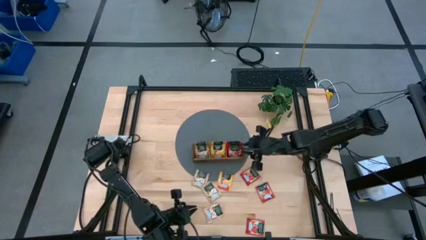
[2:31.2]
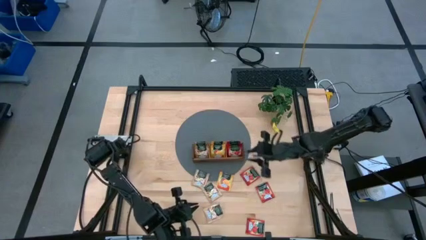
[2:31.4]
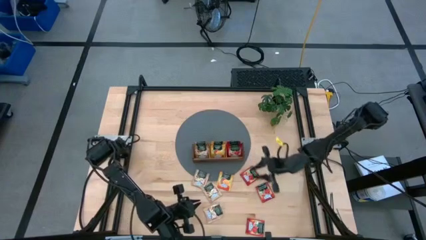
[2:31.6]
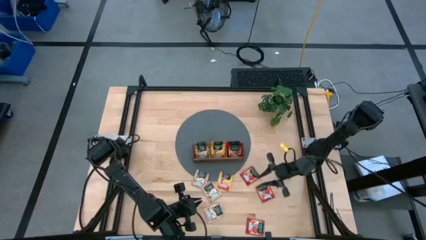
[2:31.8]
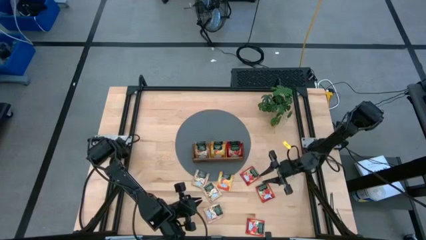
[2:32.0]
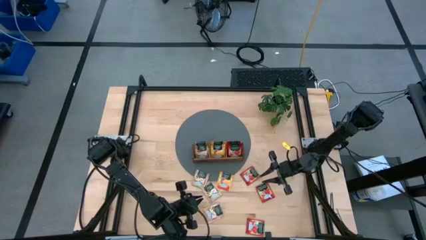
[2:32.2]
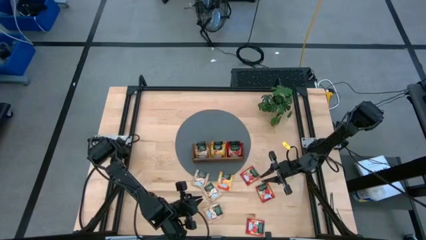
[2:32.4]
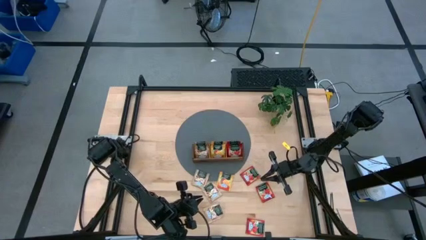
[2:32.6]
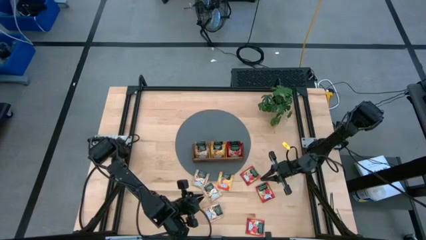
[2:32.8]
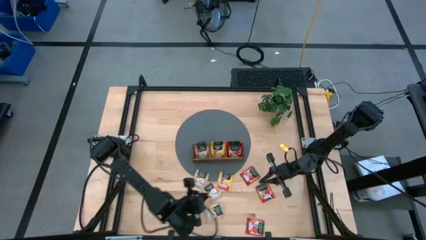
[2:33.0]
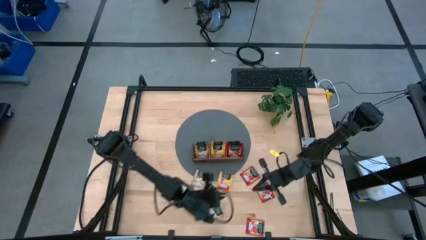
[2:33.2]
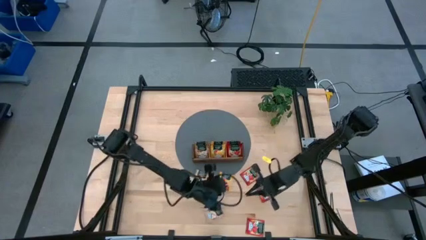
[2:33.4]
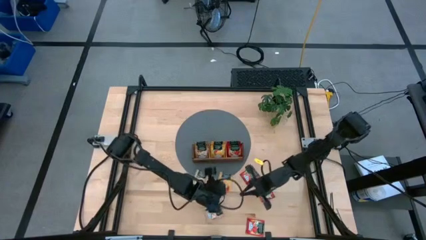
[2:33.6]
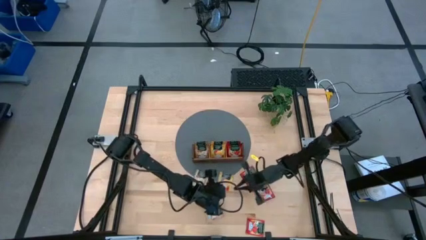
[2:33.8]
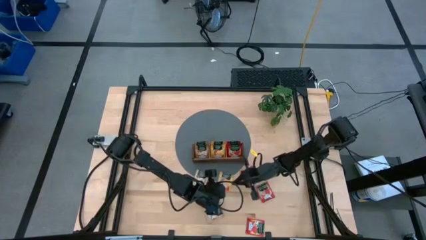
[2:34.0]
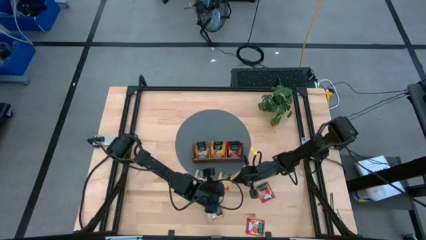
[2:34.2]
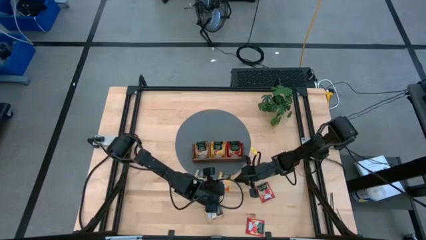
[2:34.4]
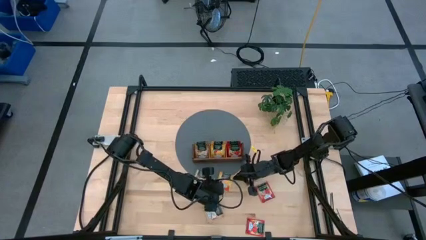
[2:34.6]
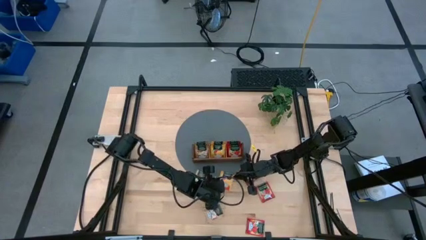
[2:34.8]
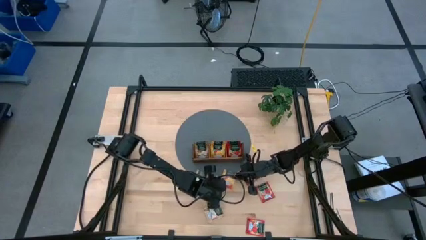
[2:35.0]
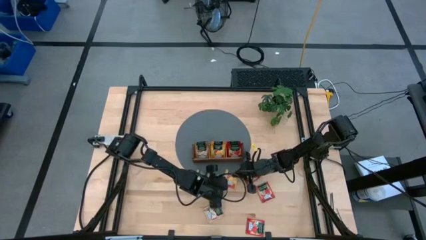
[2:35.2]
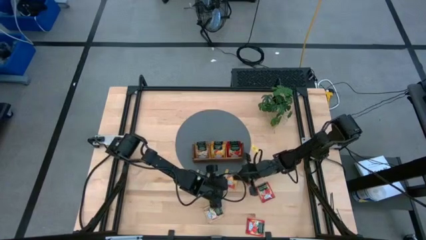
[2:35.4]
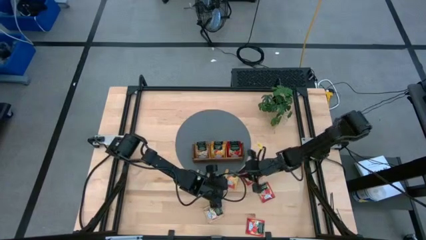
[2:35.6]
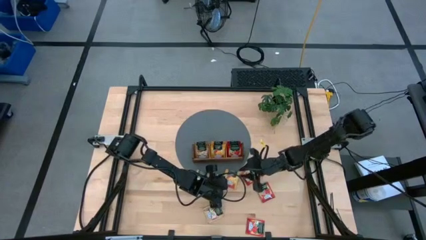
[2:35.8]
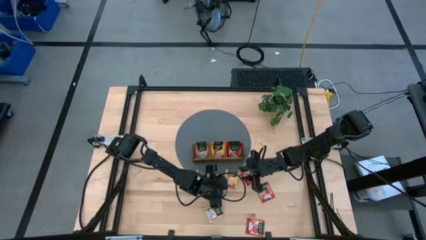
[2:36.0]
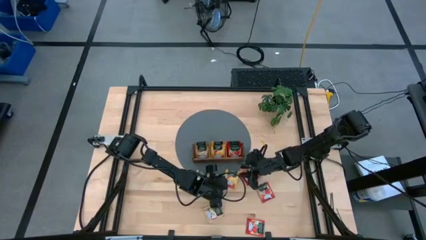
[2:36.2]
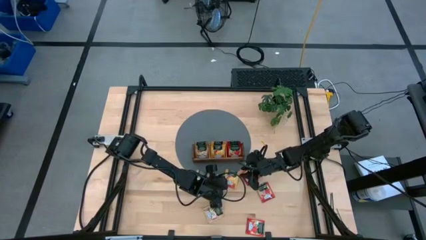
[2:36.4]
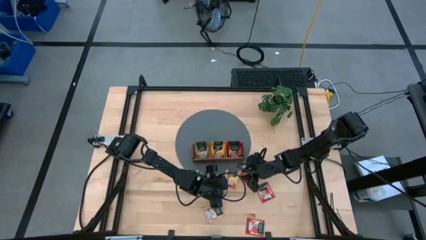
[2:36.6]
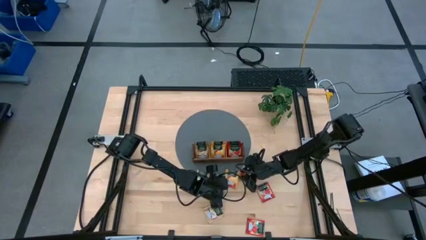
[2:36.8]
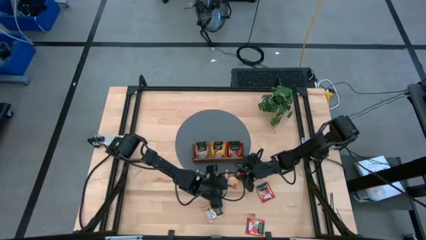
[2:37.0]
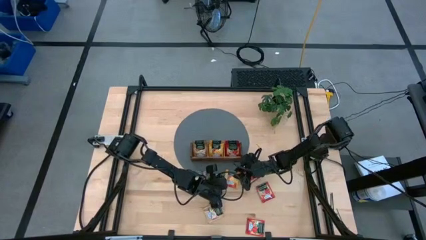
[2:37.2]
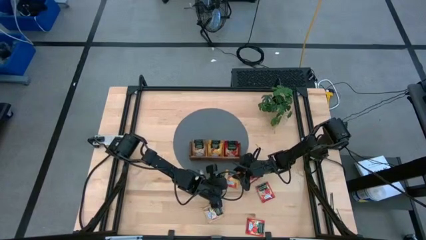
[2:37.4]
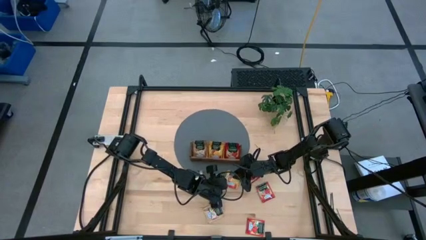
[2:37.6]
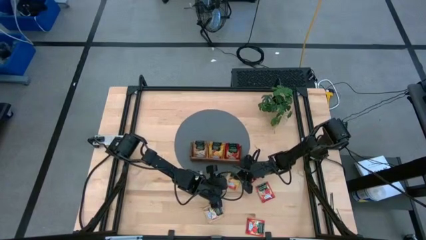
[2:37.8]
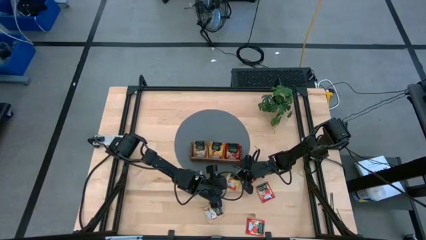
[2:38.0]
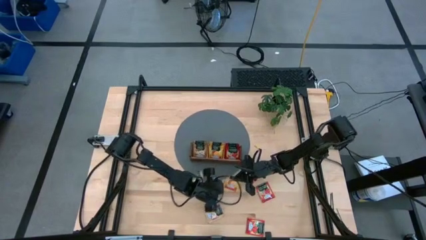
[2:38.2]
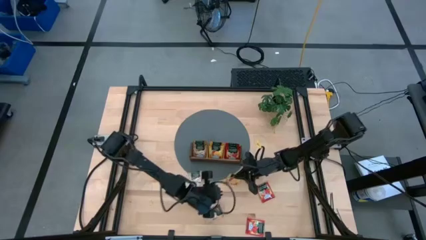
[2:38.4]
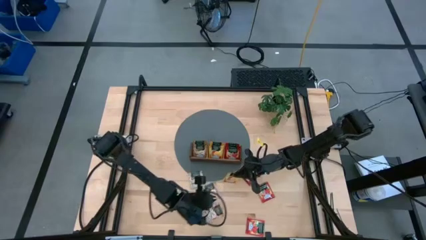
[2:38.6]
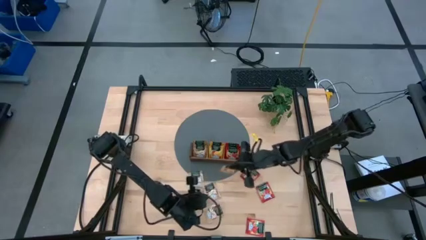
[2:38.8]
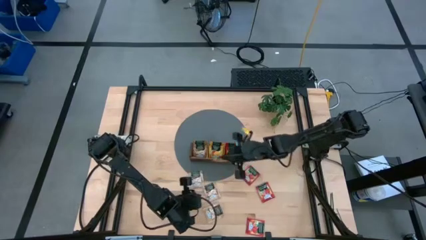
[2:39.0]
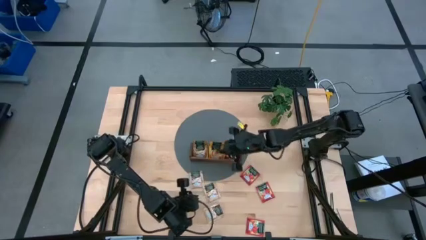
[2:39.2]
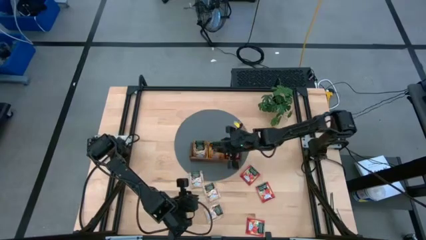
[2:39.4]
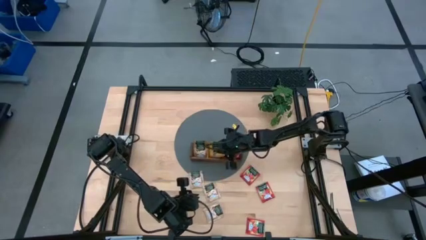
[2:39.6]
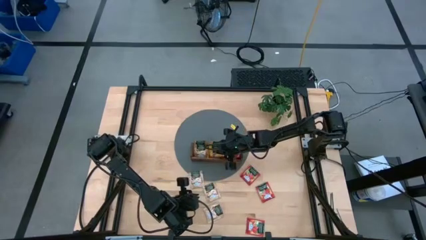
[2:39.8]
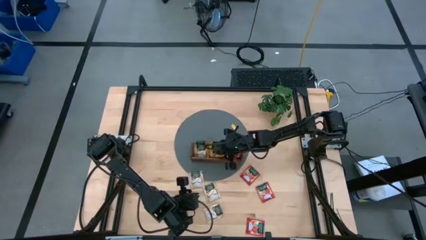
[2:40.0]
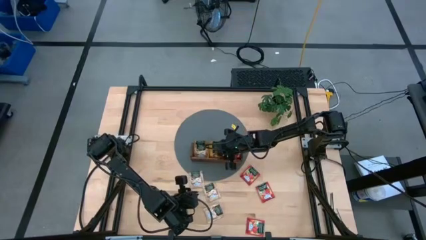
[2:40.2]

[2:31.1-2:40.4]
Task: Pick & Place Tea
Put the yellow tea bag into the middle section of the wooden organizer

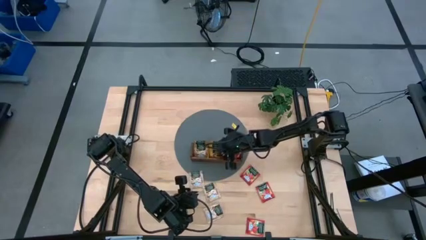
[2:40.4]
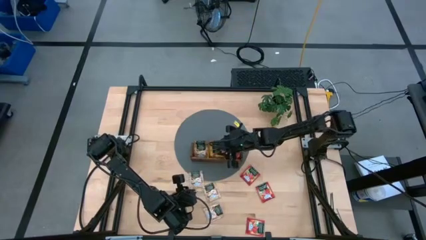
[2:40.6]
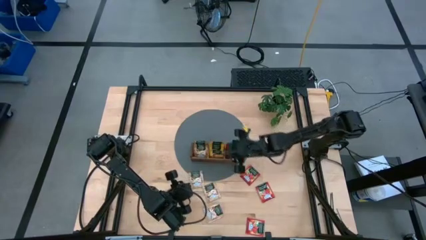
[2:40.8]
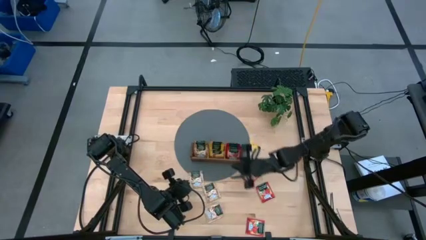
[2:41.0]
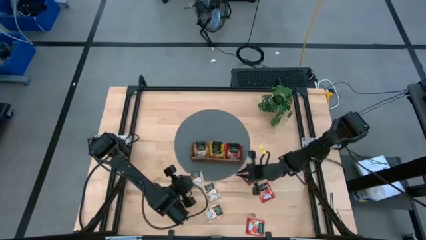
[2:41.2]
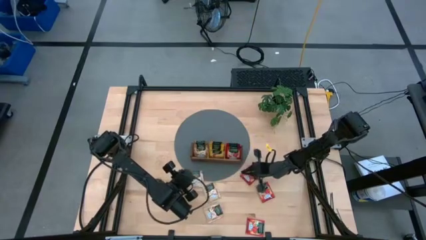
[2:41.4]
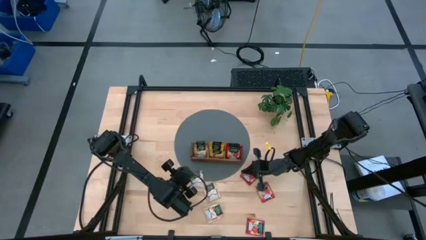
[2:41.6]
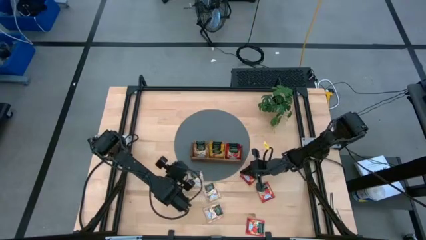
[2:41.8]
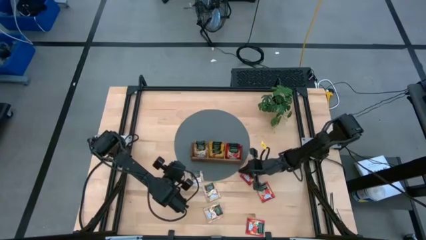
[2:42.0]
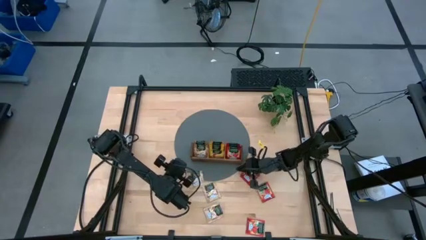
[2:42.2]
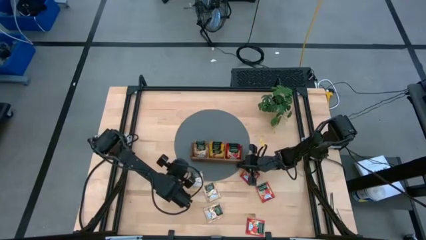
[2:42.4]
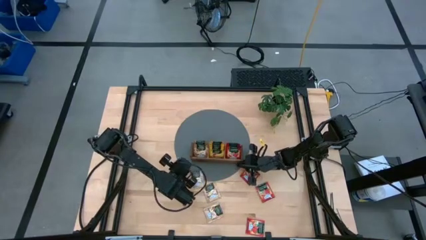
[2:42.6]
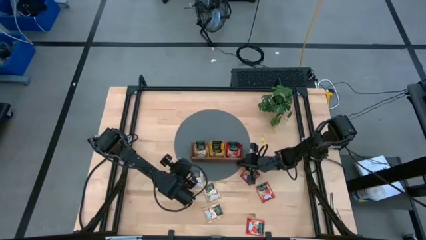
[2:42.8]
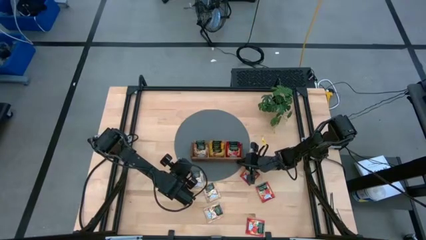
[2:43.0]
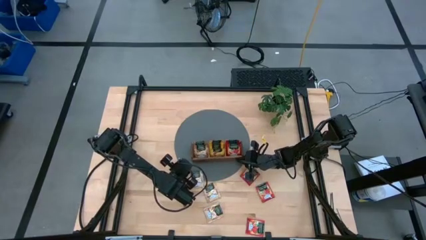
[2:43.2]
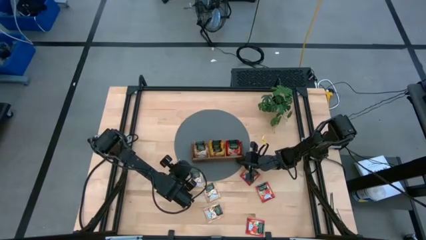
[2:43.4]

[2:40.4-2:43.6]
Adjust the wooden organizer

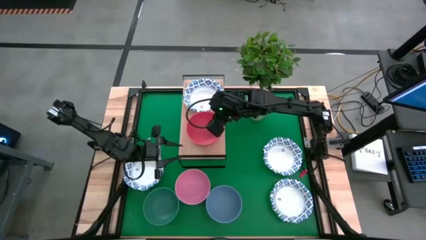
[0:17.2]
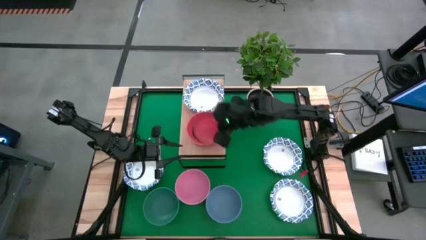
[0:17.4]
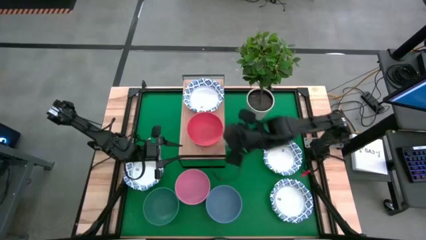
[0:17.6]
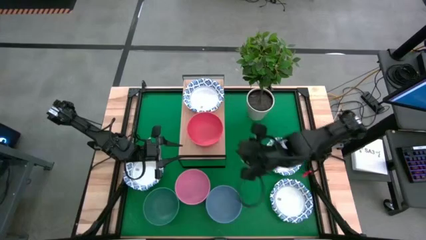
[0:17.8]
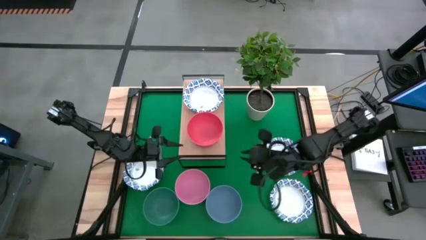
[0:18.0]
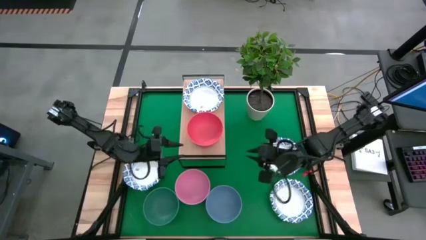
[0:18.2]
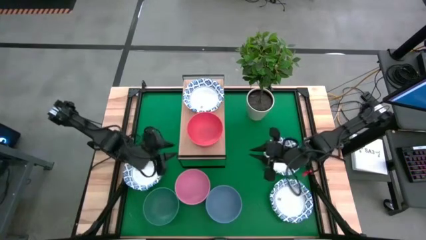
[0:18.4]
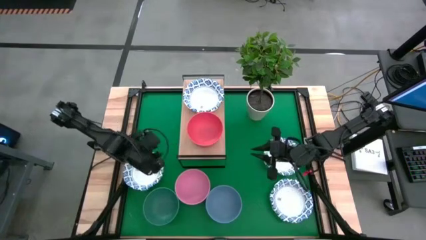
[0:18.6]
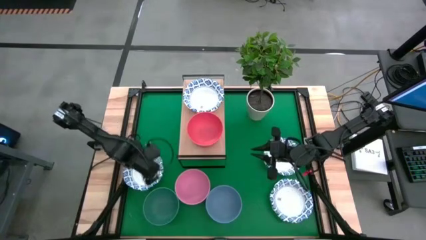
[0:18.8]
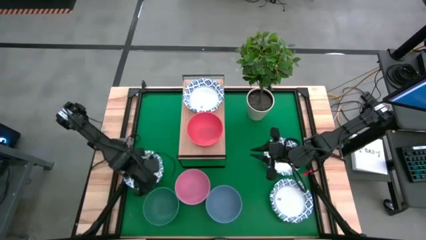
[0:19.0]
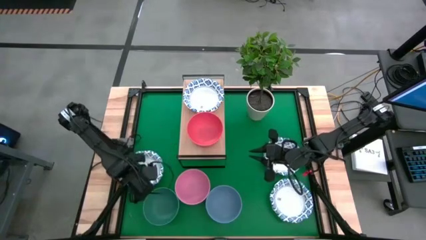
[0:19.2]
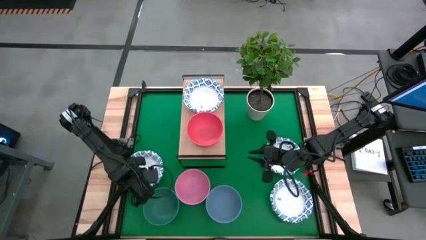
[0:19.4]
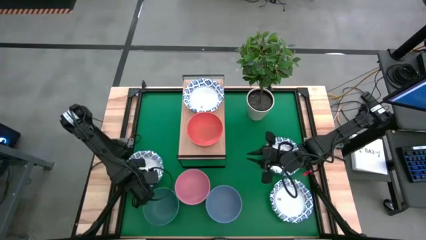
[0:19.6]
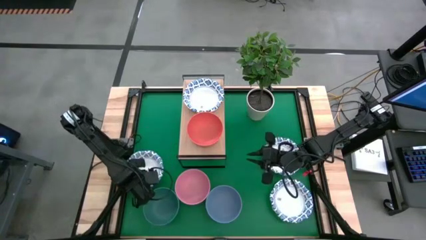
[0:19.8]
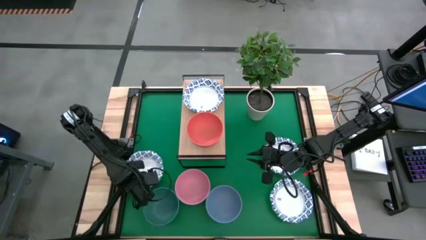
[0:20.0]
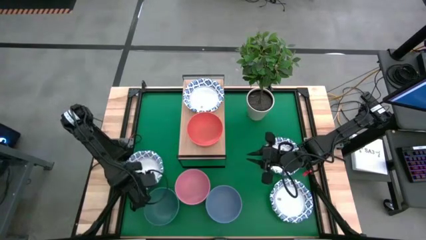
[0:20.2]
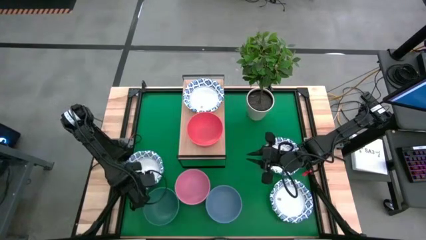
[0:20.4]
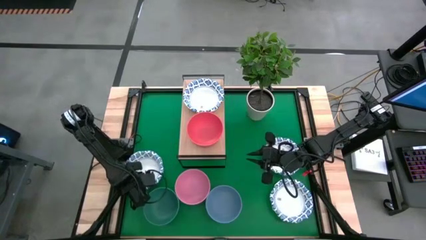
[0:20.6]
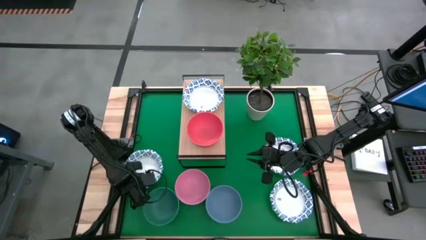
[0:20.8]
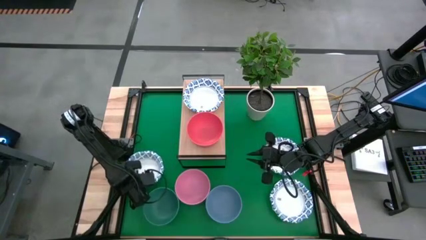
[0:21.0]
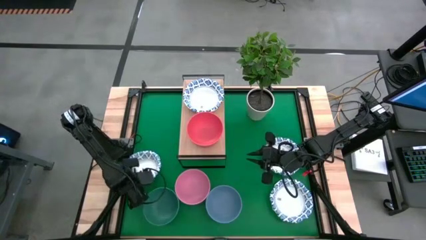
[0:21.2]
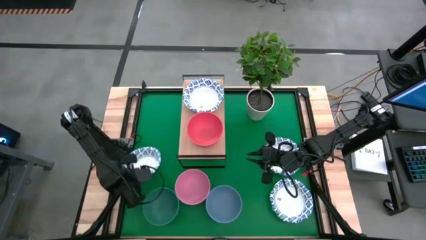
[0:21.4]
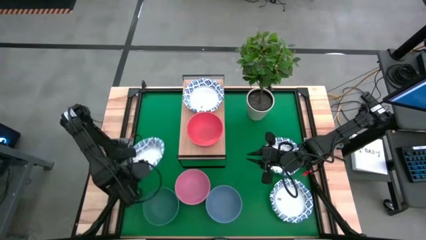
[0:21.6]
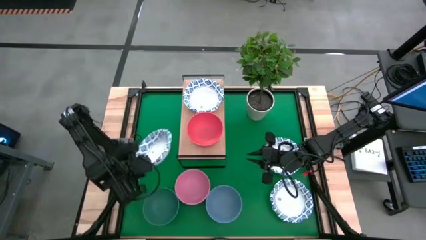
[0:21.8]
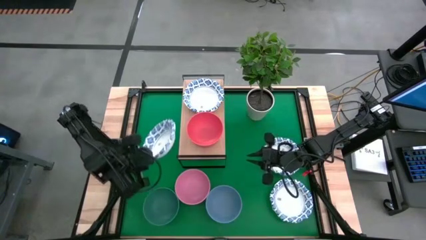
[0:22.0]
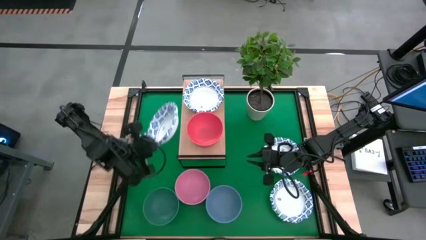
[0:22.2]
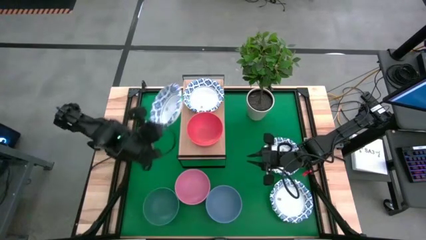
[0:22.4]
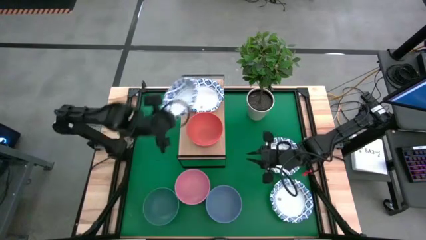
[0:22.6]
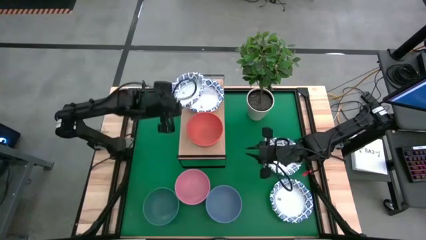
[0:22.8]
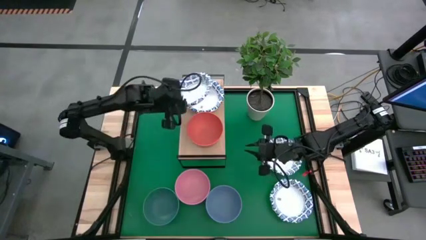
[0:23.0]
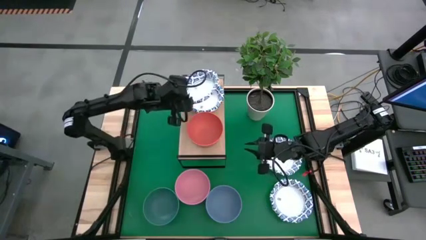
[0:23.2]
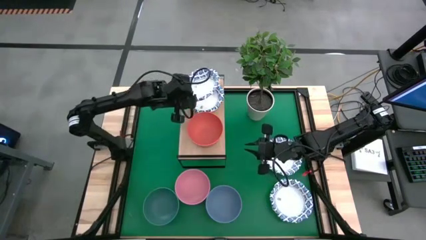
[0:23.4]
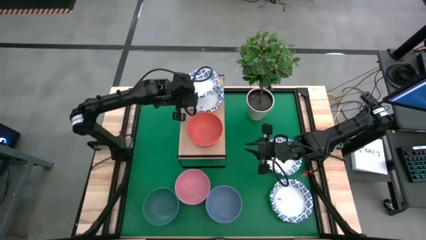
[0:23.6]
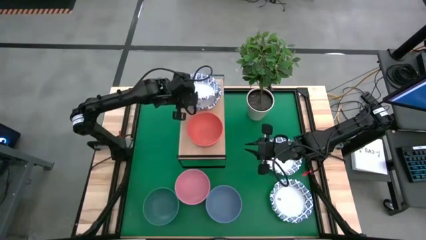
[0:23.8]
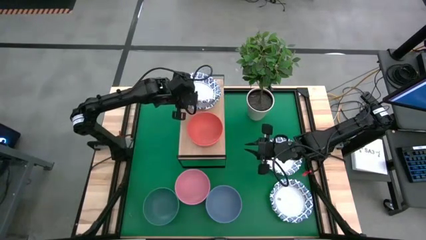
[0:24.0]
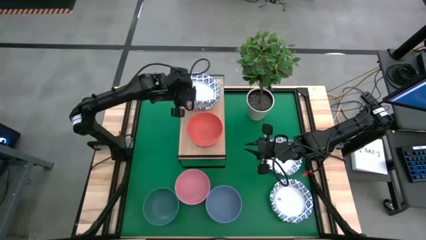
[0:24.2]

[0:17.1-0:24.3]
Task: Place and stack bowls onto a shelf
Stack the white patterned bowl on top of the other white patterned bowl on the shelf
